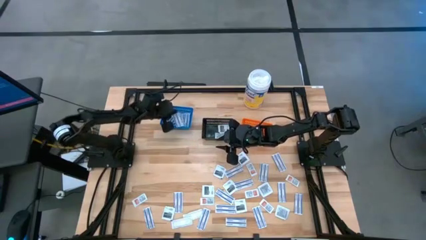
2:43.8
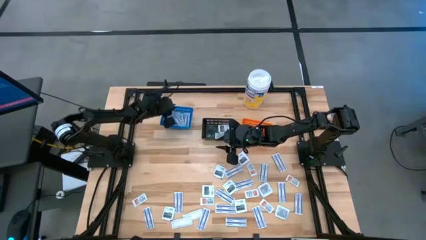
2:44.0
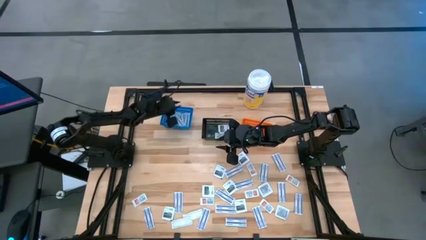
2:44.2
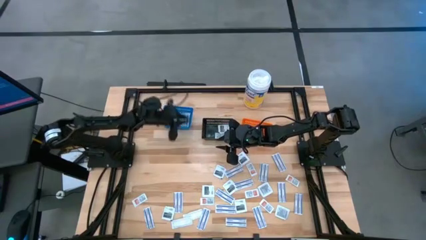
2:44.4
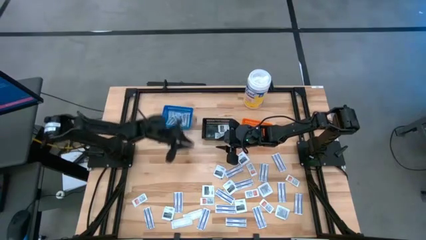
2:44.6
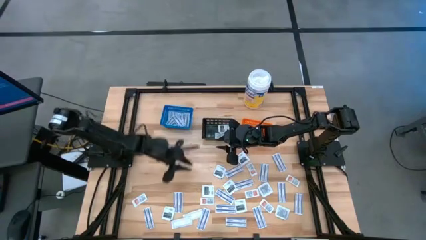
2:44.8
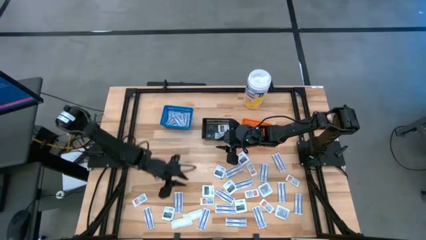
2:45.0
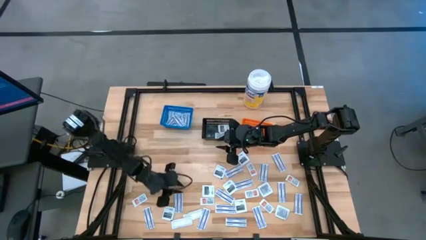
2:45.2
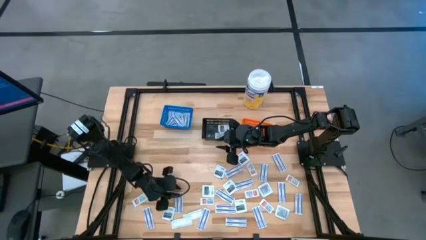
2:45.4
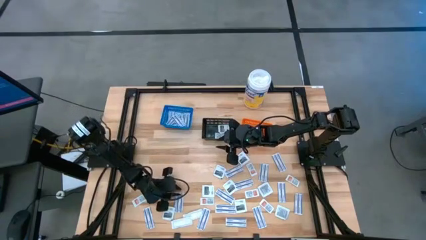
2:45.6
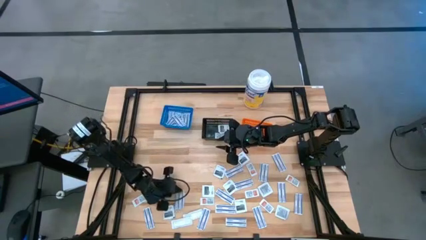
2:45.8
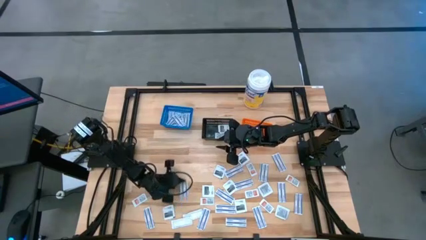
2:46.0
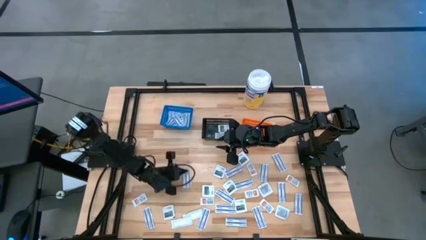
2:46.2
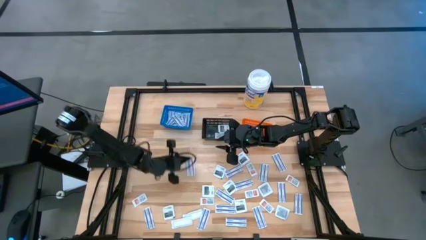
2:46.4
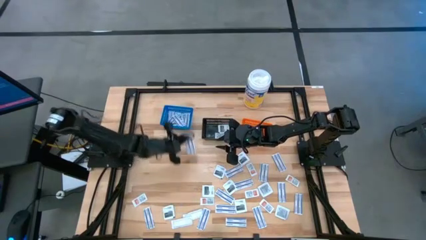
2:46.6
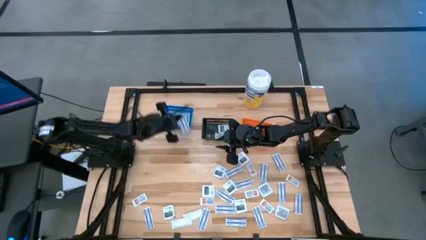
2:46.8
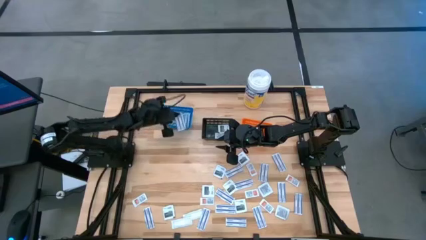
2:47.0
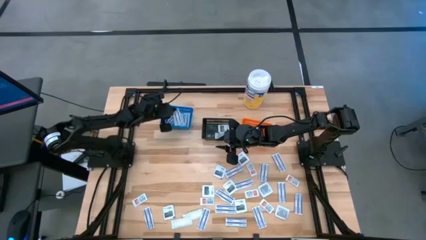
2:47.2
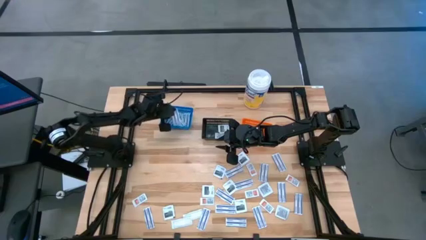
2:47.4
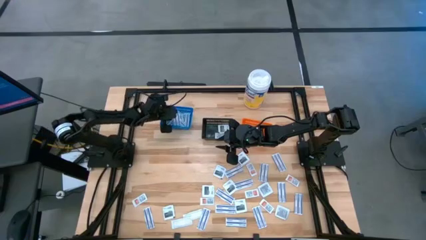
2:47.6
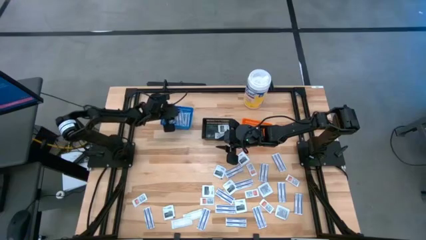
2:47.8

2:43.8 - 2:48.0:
Task: Pick & Place First Aid Supplies
Put the bandage into the blue container

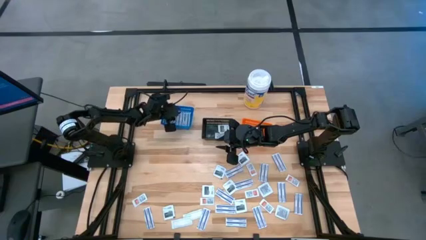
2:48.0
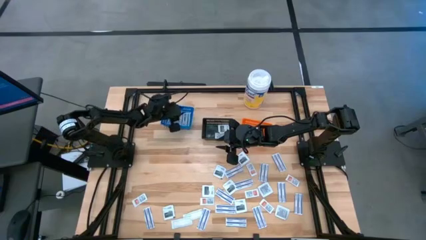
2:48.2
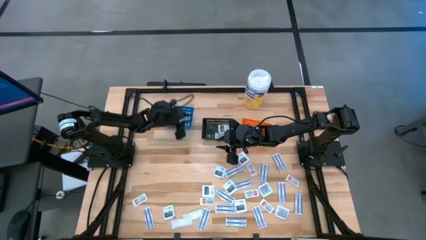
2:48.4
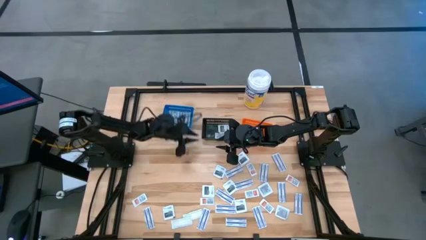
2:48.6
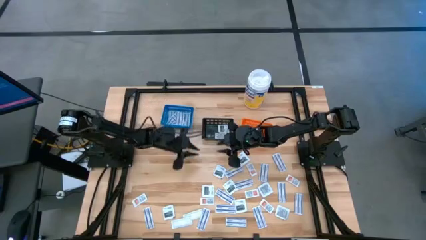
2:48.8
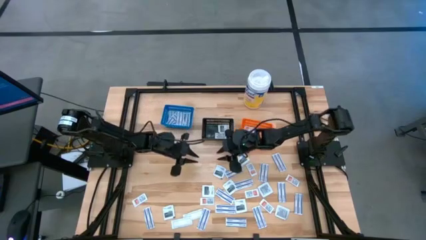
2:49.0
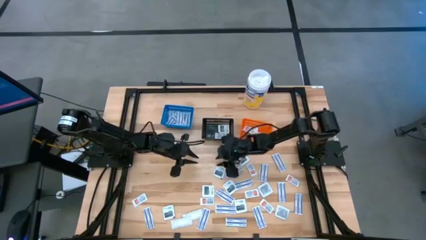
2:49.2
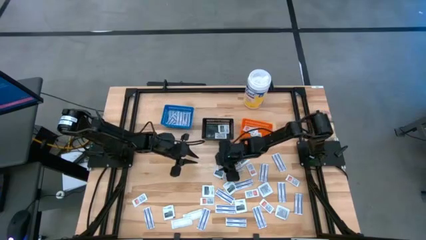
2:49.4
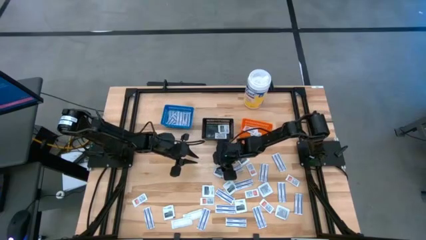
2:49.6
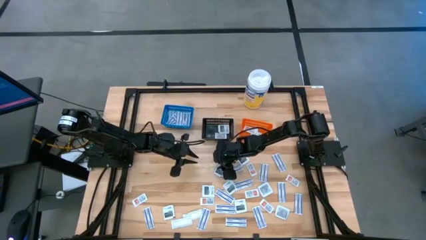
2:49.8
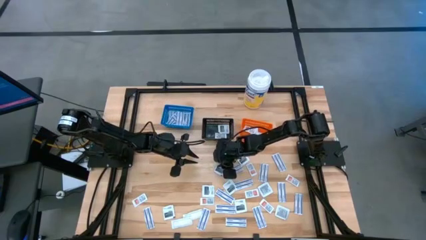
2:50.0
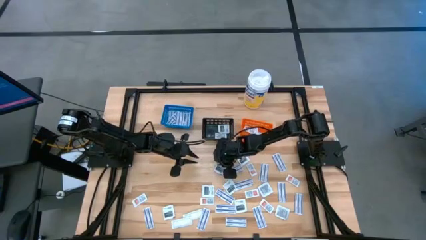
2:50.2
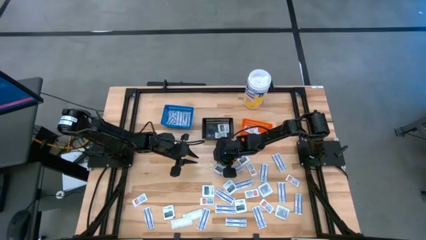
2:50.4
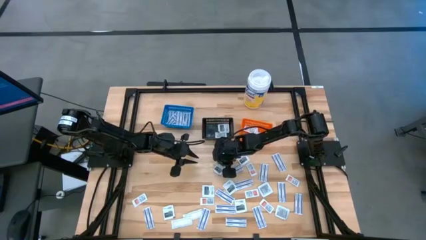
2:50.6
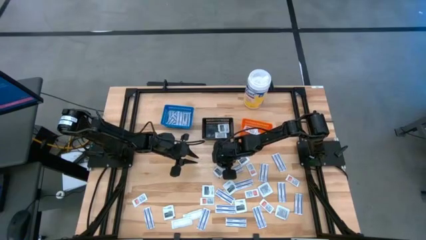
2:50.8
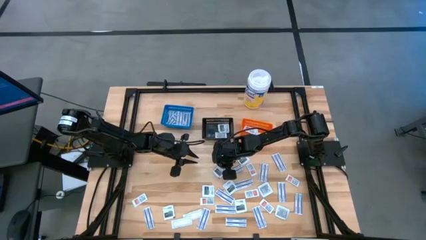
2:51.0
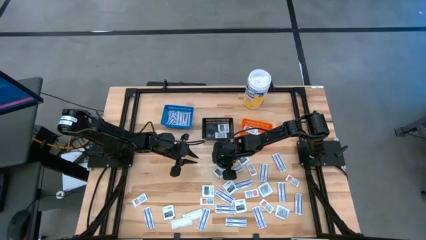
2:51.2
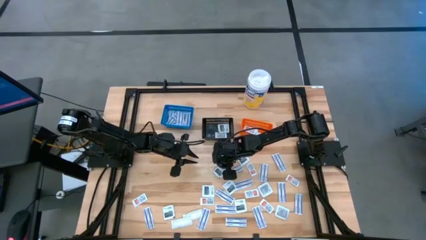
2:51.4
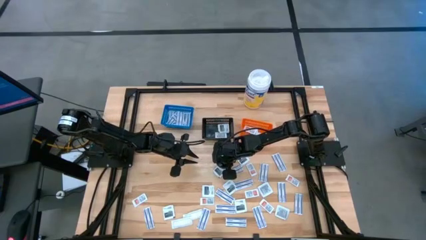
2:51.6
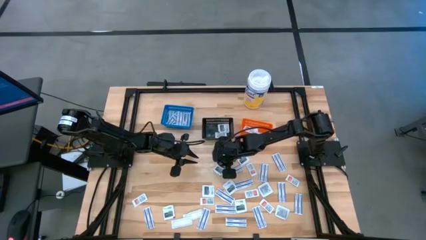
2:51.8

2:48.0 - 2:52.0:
Put the towelette pack into the black bin

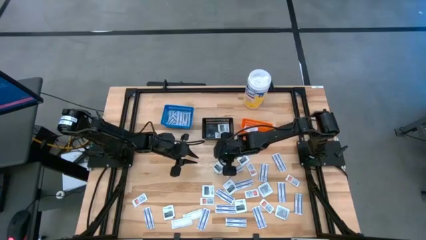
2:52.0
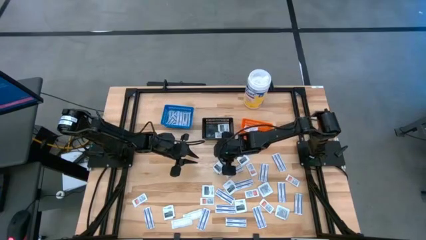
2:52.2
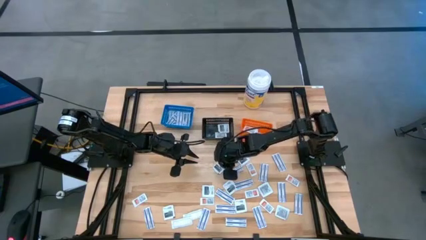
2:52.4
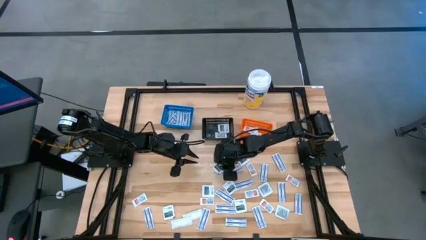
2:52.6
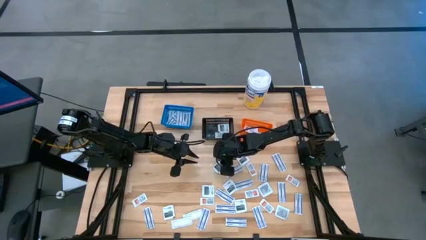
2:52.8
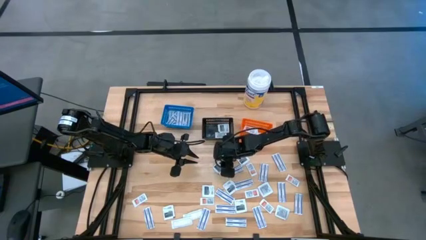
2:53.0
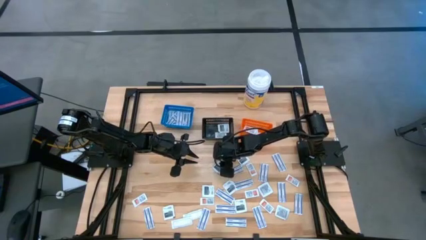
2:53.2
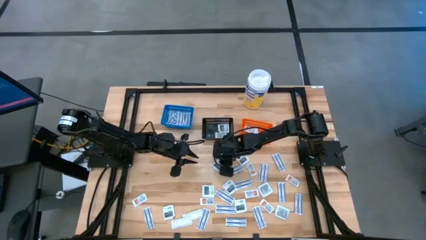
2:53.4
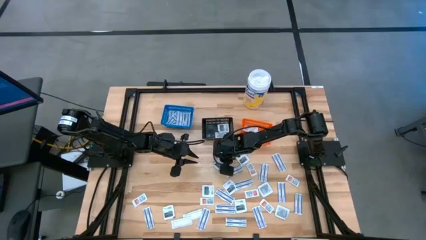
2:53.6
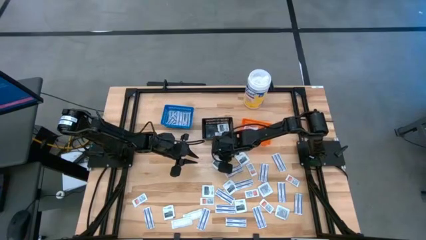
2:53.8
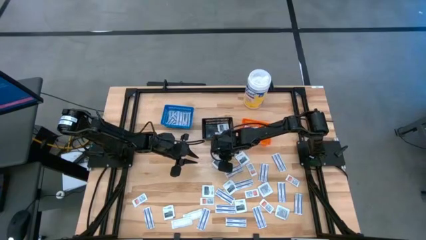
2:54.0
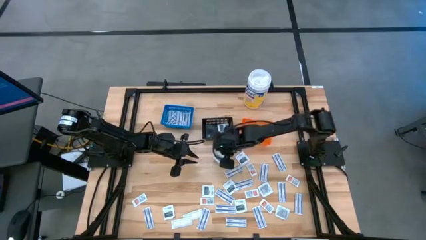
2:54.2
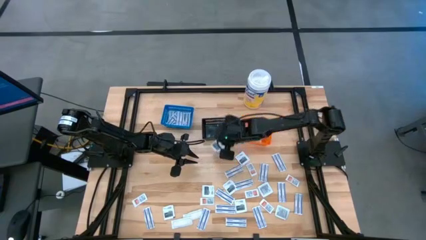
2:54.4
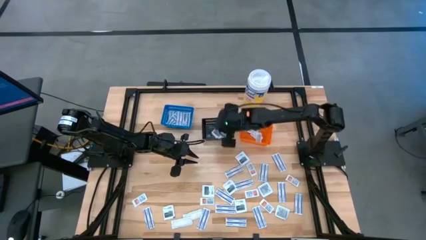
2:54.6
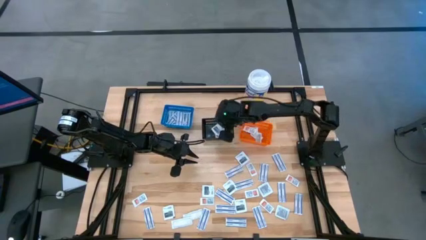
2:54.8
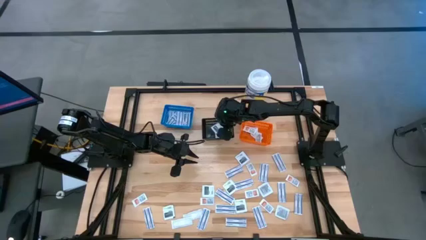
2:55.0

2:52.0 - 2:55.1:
Put the towelette pack into the black bin

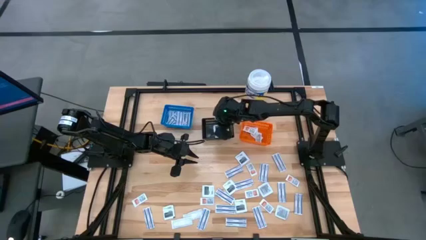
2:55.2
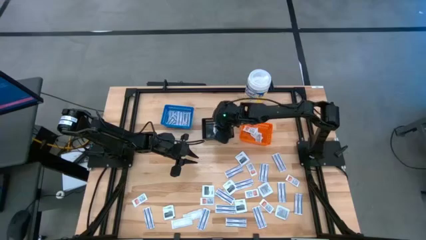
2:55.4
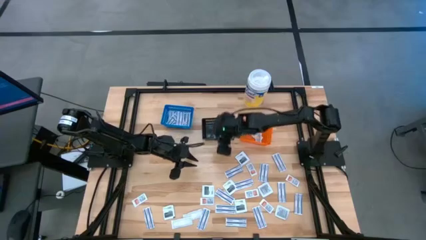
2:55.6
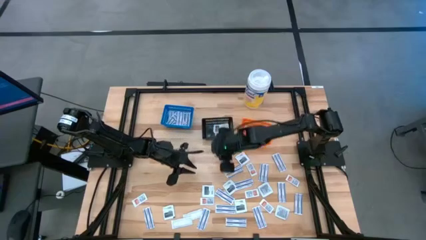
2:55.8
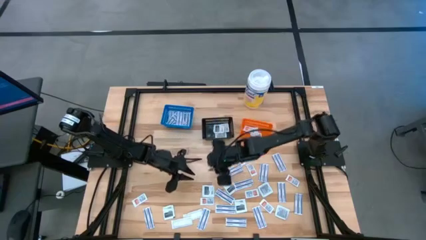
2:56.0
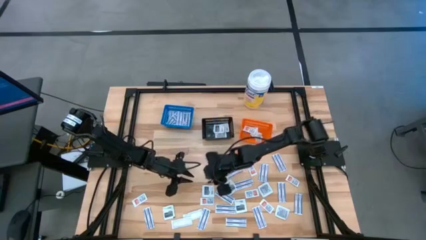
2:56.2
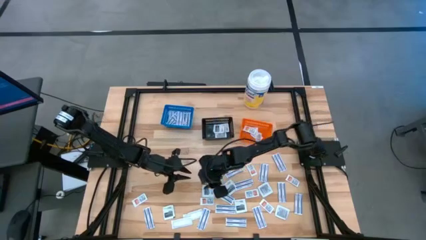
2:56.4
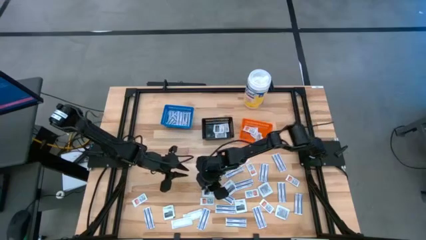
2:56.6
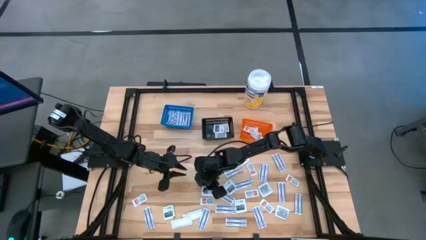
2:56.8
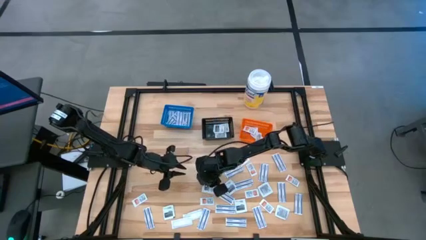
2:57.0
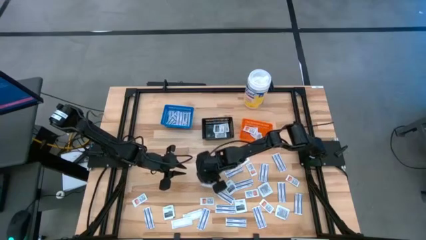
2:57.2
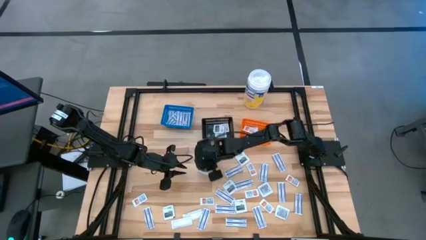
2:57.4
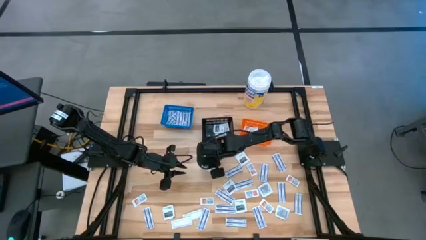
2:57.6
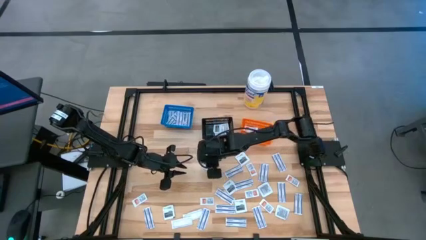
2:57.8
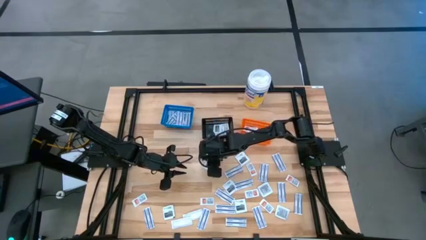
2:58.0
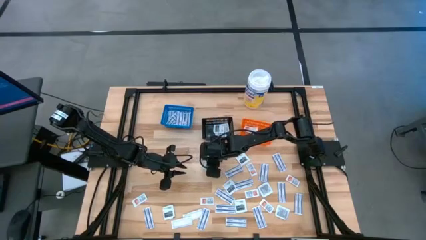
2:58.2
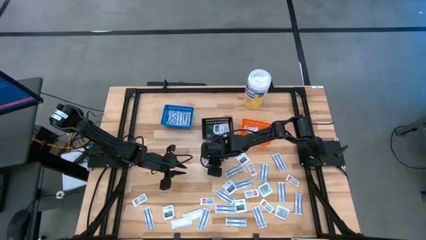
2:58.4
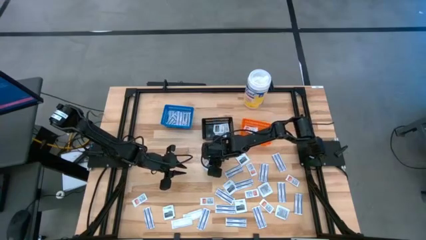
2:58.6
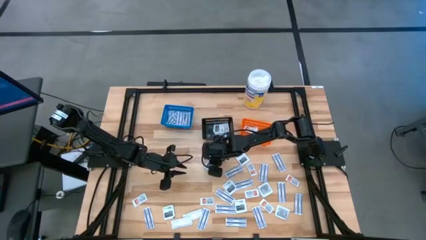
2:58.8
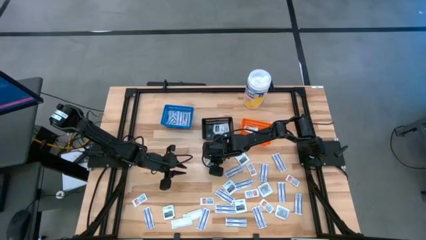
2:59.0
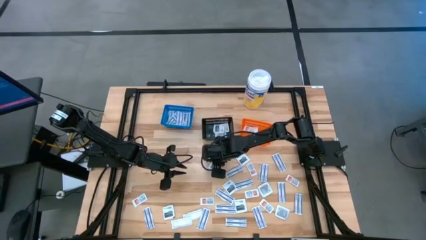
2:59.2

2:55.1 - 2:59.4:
Put the towelette pack into the black bin

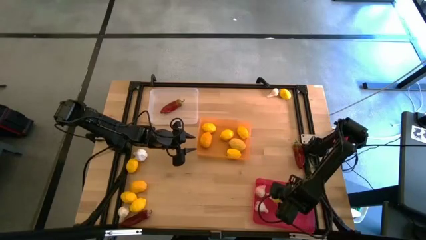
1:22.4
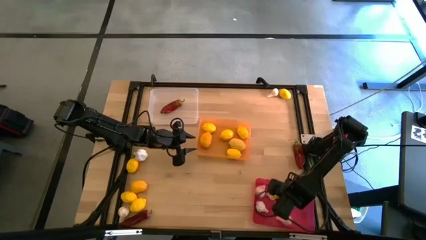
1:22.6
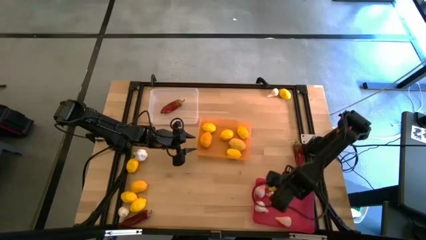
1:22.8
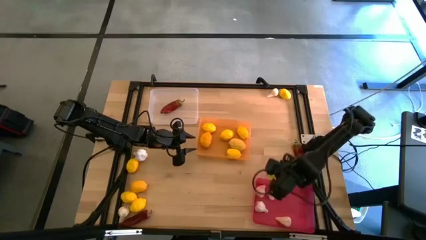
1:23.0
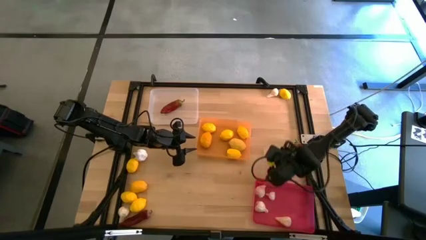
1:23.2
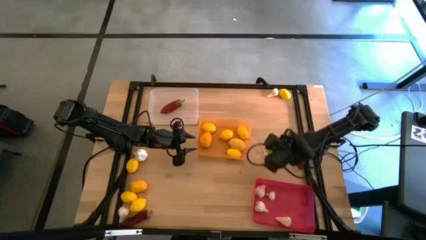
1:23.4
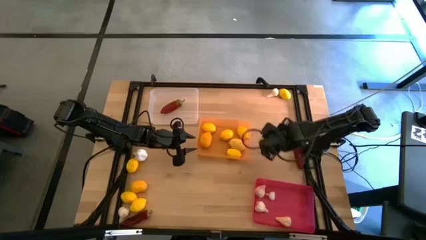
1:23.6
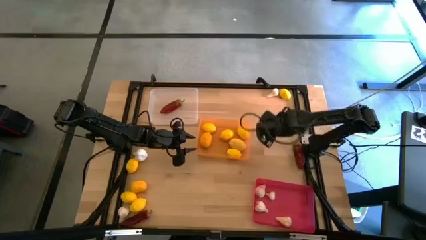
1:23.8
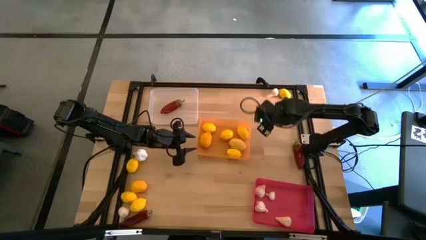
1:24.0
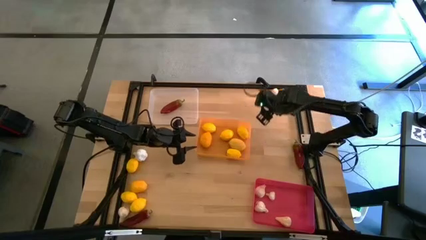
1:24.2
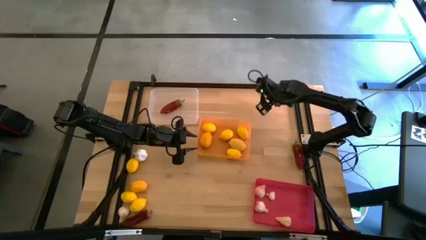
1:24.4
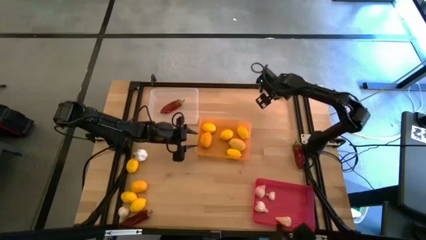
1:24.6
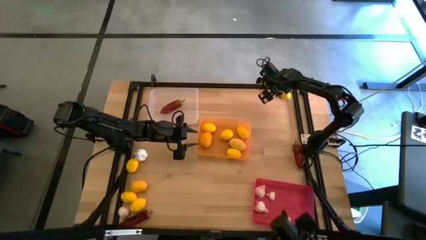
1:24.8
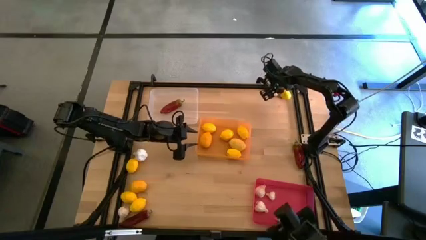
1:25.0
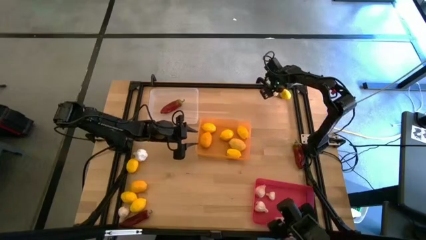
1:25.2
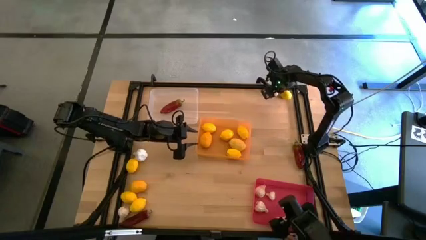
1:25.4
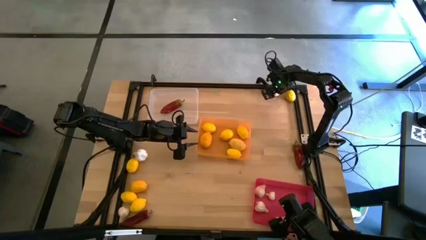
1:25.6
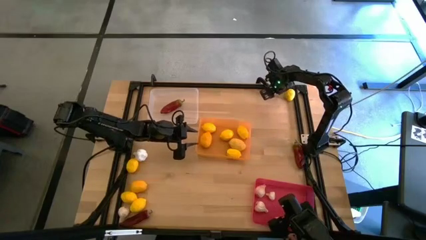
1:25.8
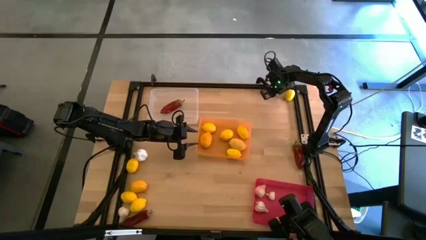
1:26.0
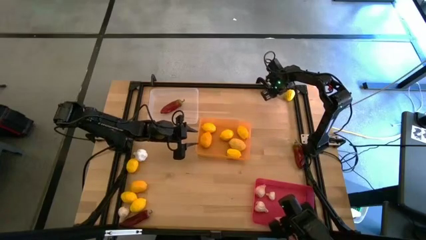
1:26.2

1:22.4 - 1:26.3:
Task: Sort produce into baskets
Put the garlic into the red bin
